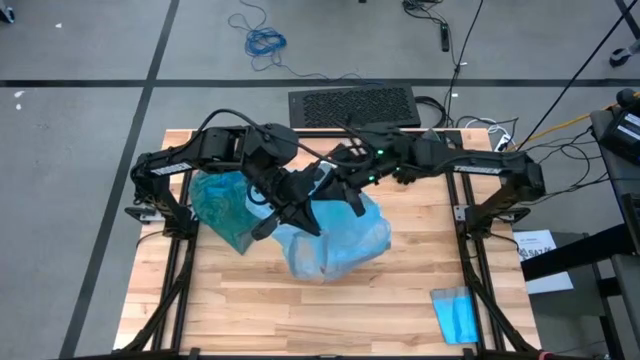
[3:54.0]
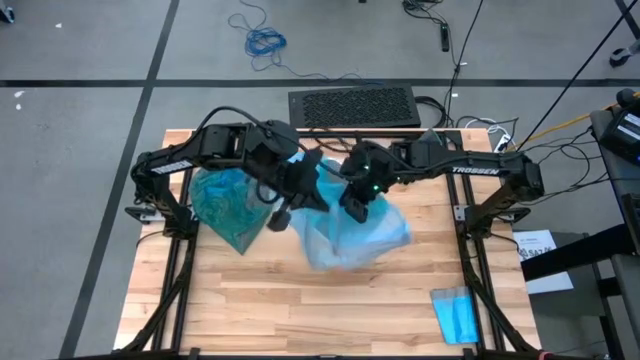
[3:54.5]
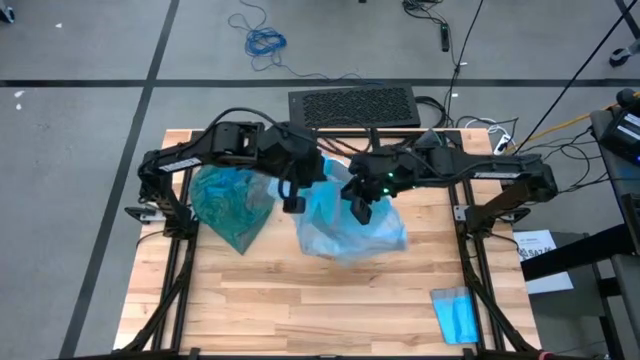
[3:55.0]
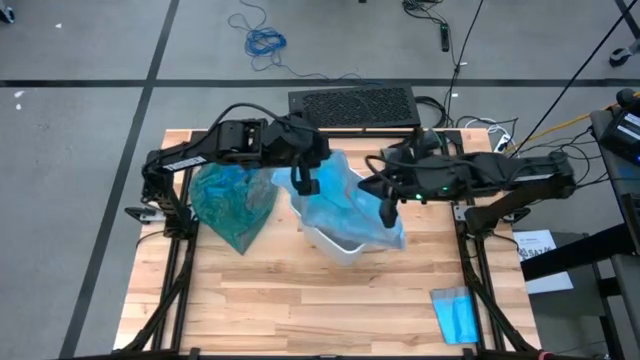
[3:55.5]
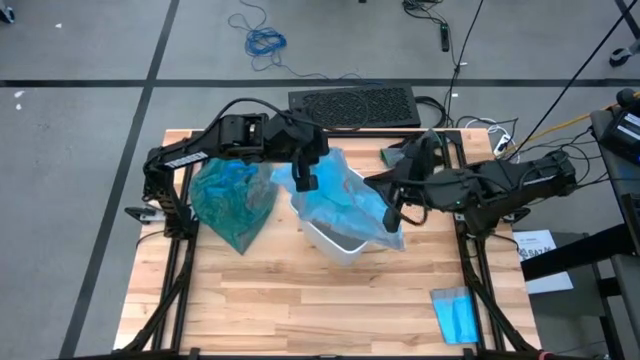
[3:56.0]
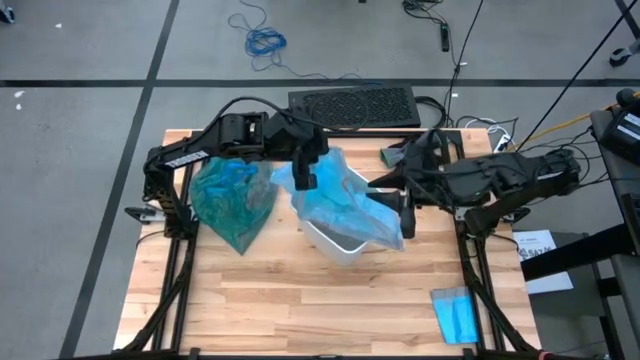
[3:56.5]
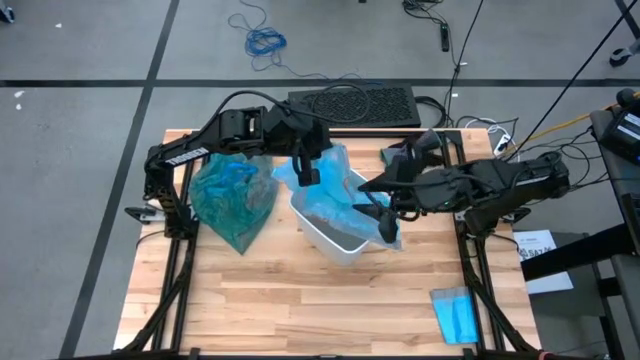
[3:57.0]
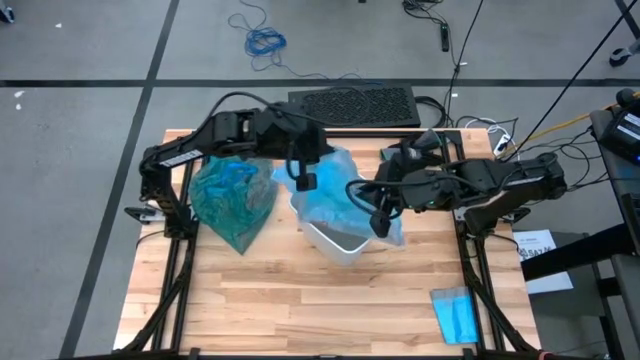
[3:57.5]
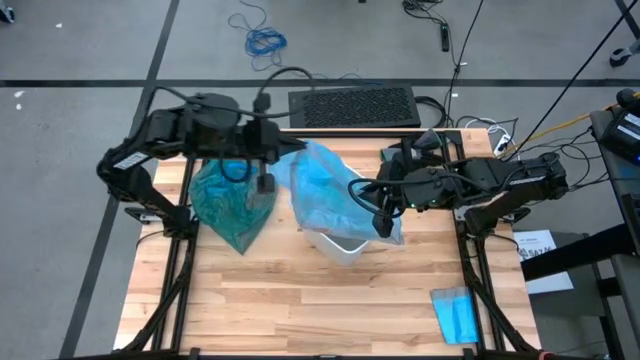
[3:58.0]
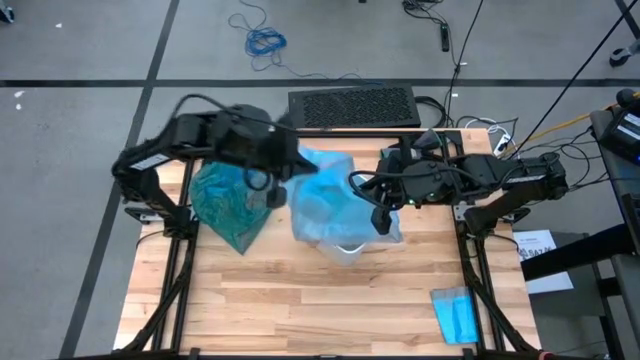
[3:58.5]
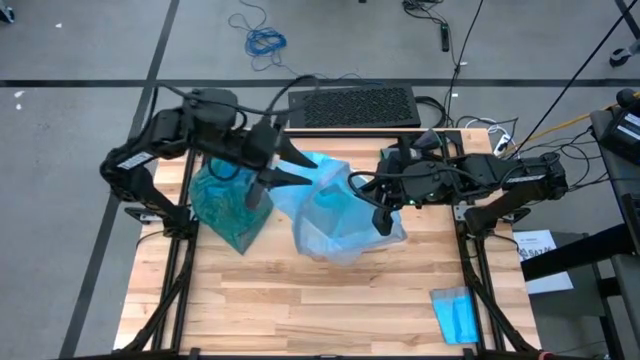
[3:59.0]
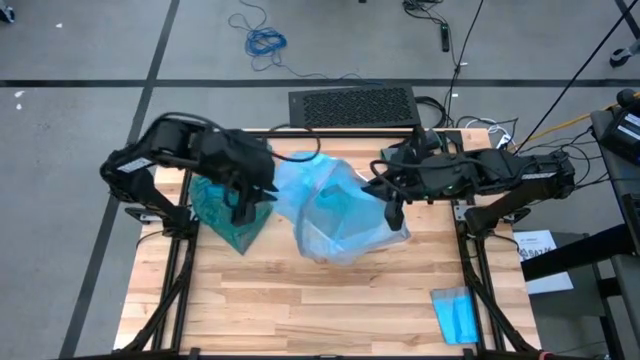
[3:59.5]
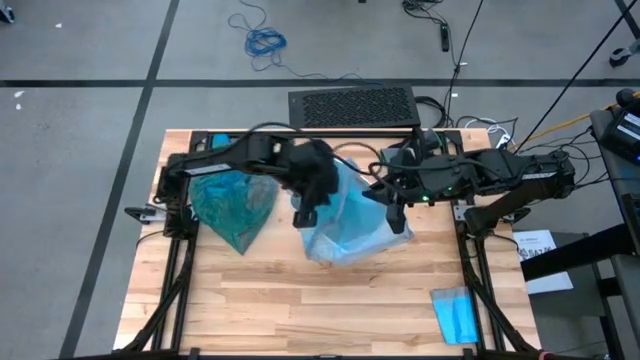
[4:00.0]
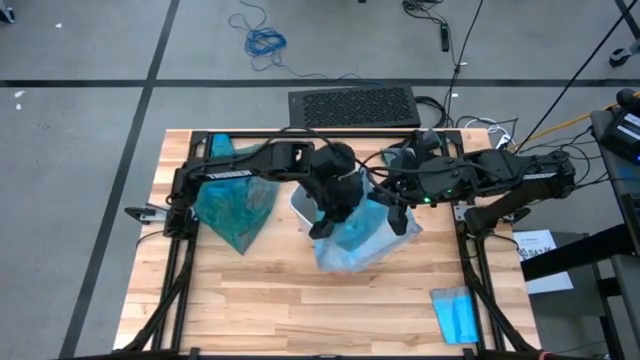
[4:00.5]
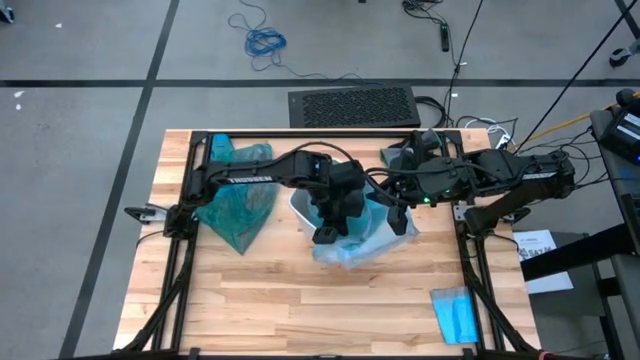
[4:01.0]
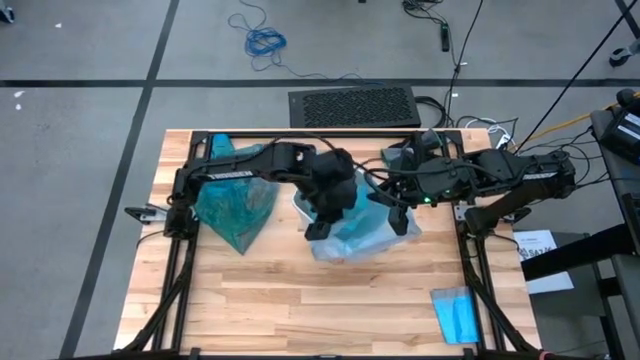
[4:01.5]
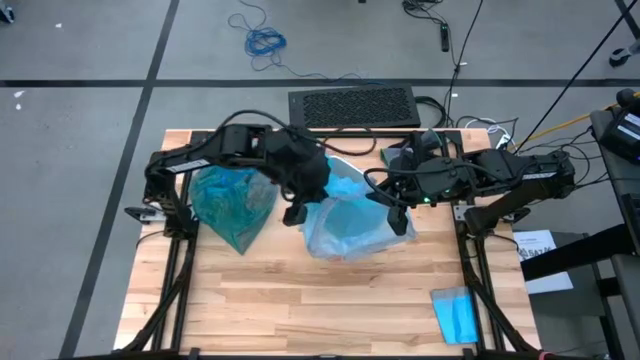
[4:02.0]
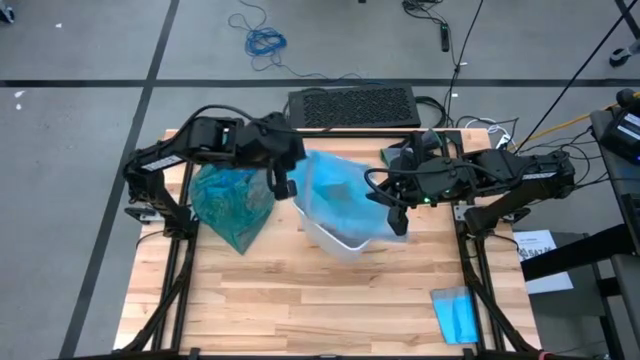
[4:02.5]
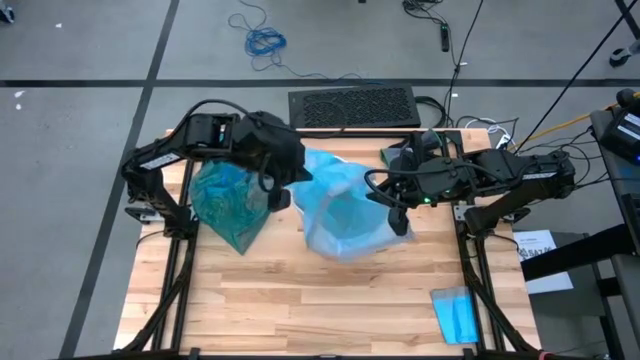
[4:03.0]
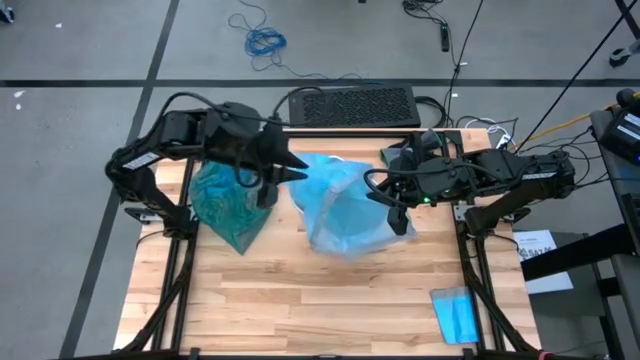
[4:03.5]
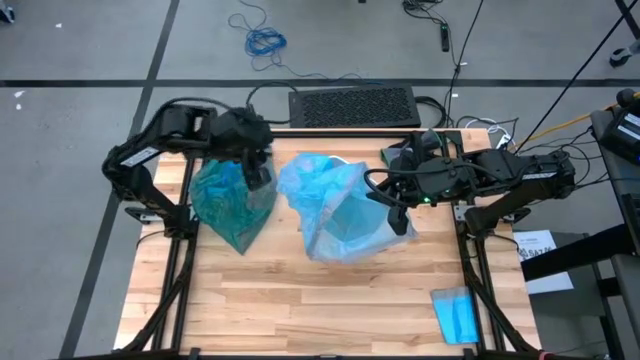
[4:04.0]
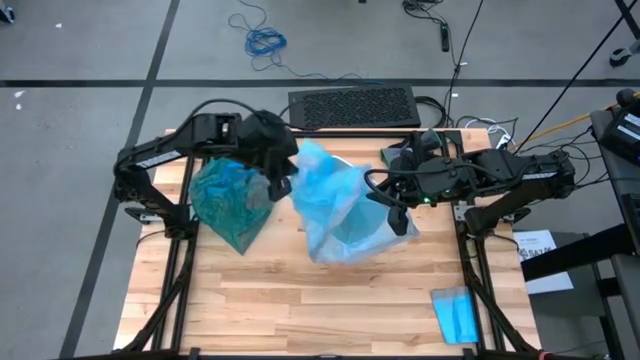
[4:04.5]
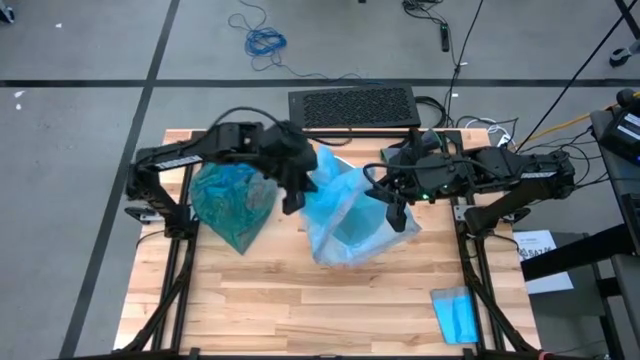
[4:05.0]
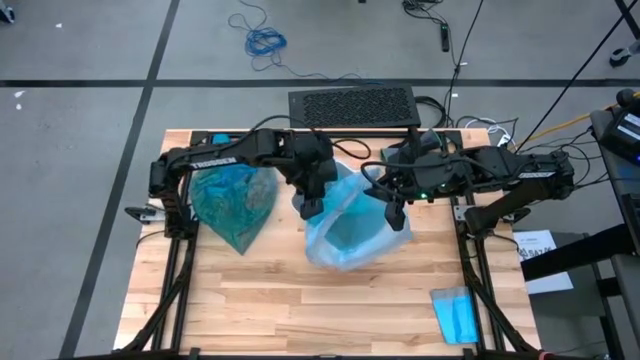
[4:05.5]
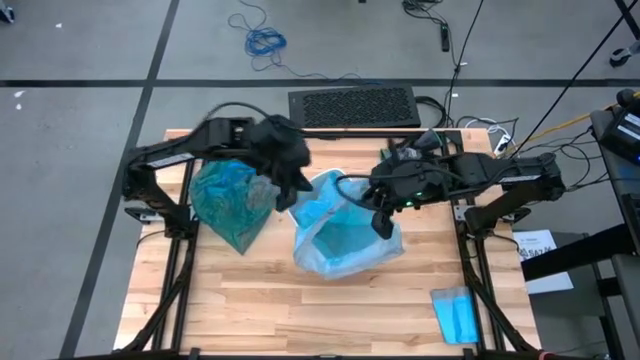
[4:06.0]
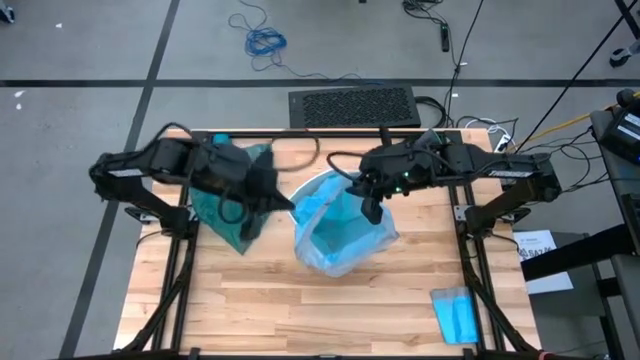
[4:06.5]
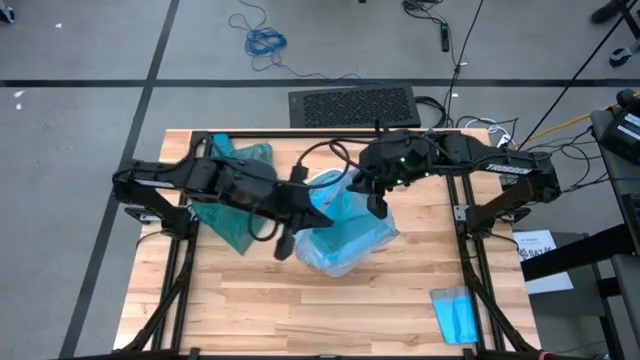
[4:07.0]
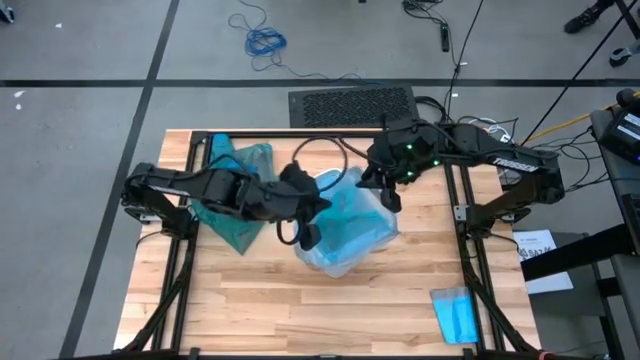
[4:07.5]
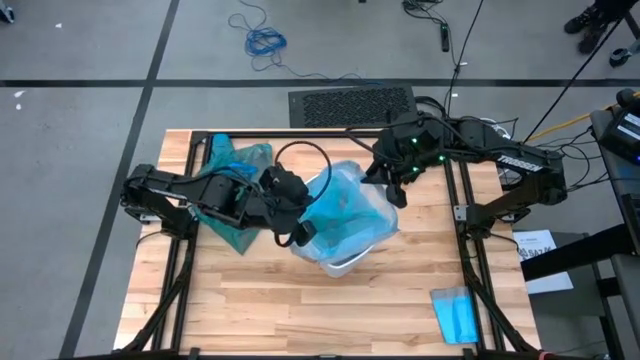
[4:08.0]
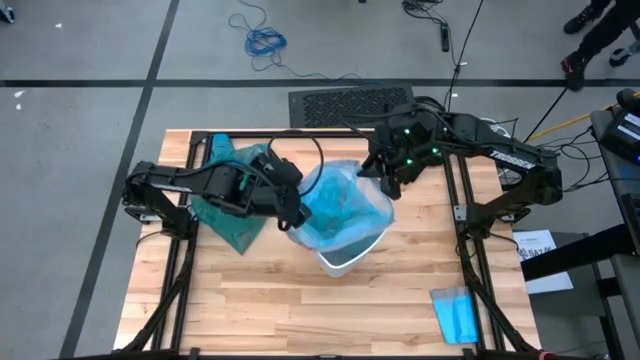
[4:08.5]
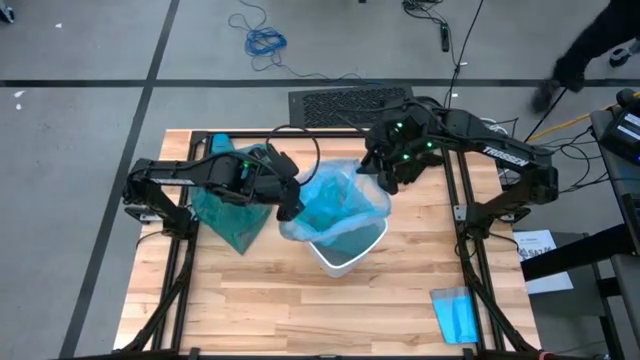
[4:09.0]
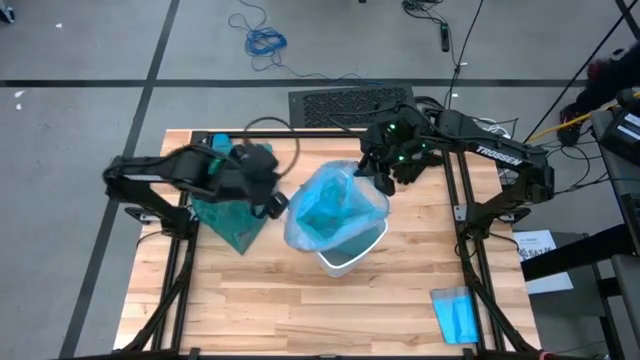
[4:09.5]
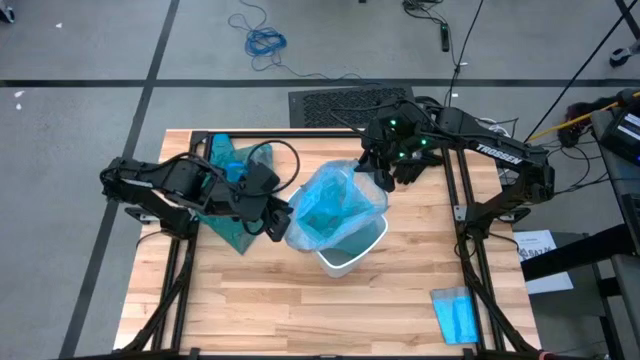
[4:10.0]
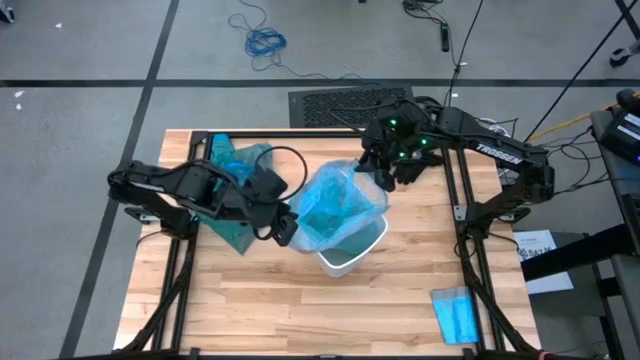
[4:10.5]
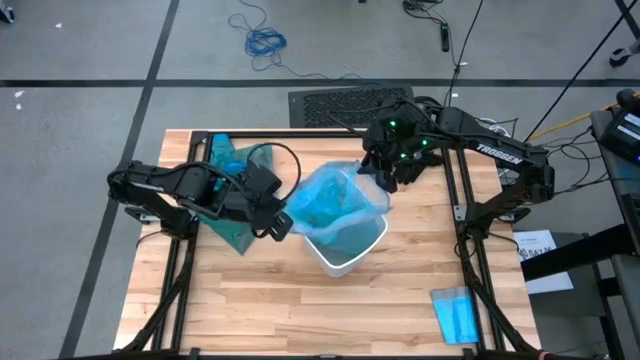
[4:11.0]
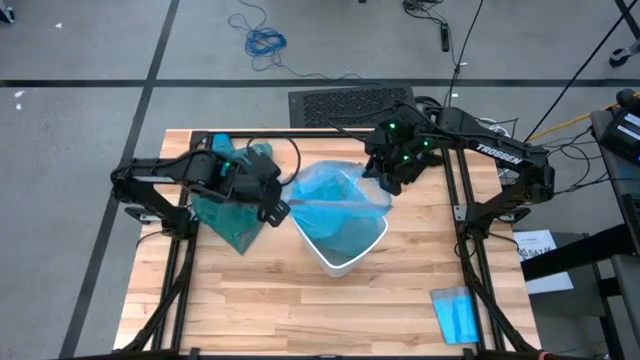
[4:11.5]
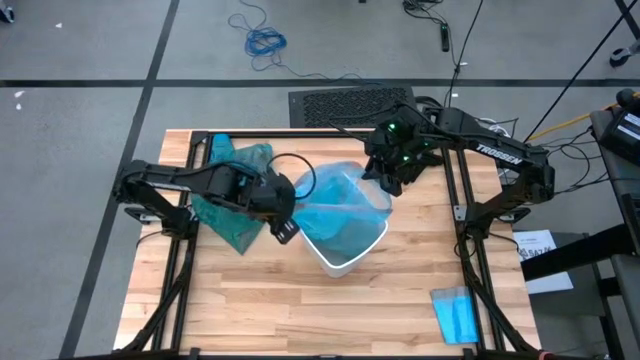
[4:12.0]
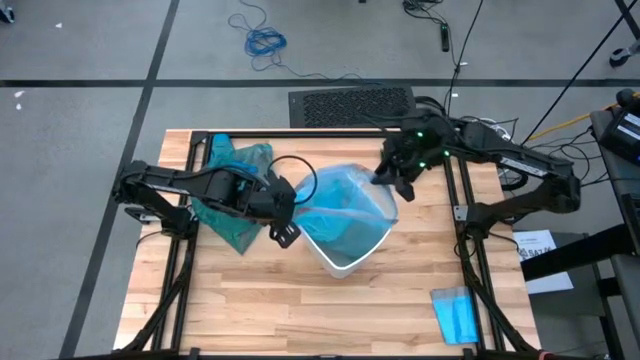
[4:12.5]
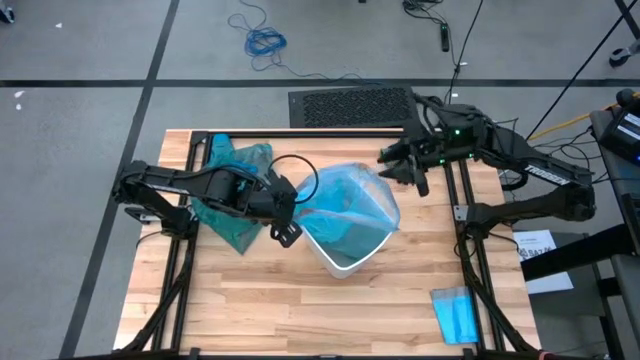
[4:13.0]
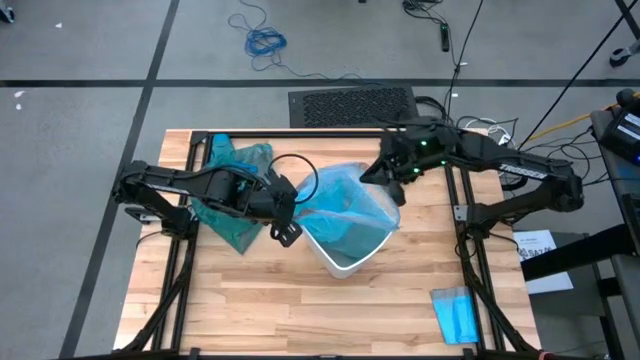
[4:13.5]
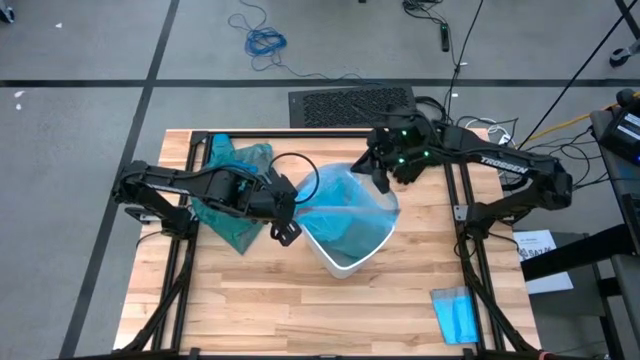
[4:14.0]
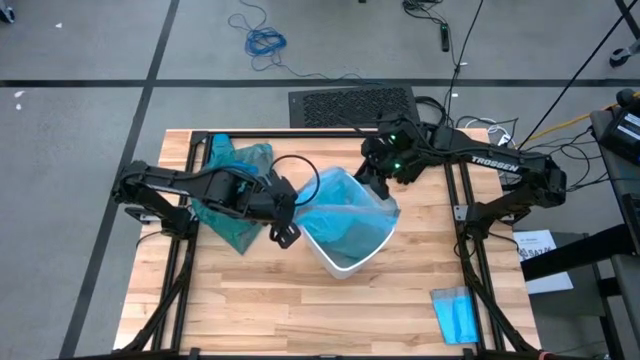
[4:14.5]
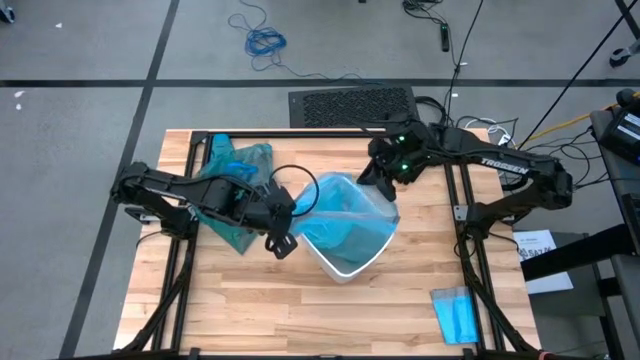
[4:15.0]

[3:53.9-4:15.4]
Task: place trash/remove bag and relplace
Insert the new blue trash bag into the trash bin
